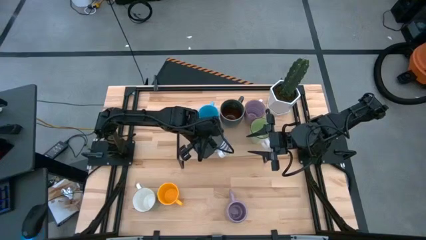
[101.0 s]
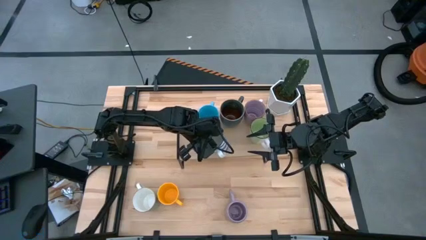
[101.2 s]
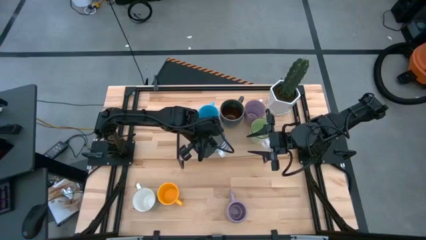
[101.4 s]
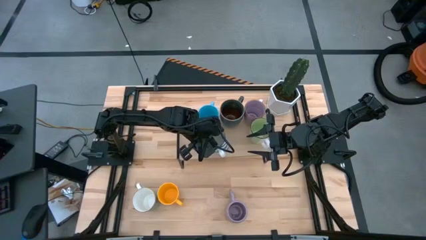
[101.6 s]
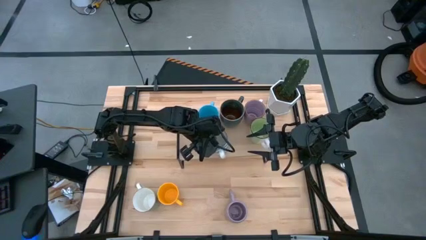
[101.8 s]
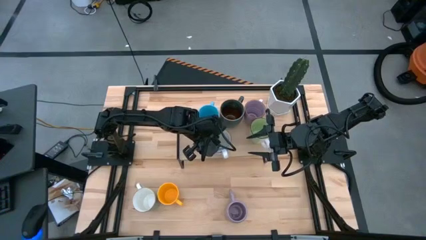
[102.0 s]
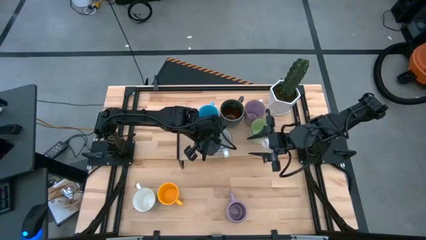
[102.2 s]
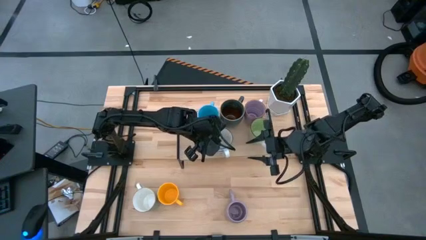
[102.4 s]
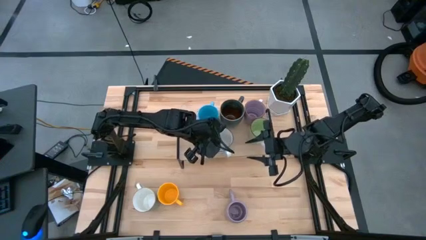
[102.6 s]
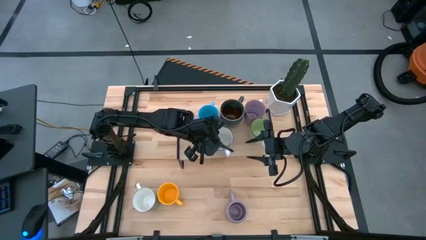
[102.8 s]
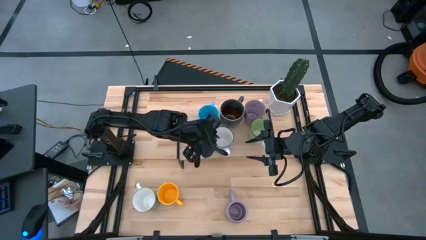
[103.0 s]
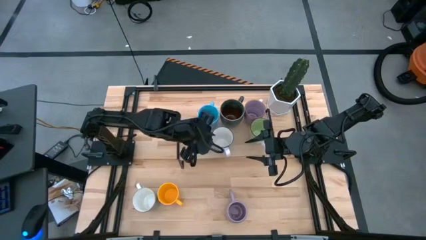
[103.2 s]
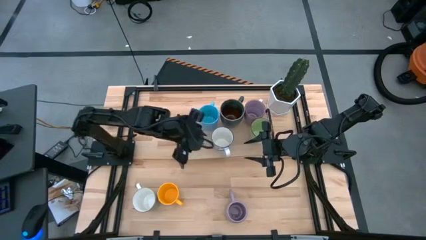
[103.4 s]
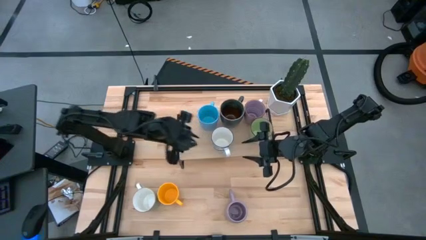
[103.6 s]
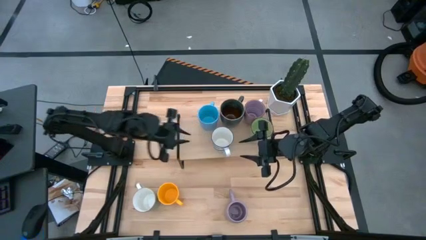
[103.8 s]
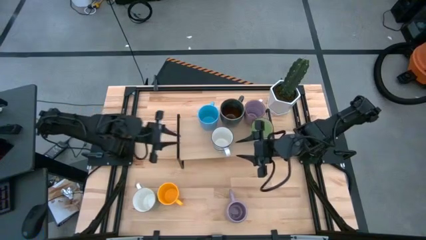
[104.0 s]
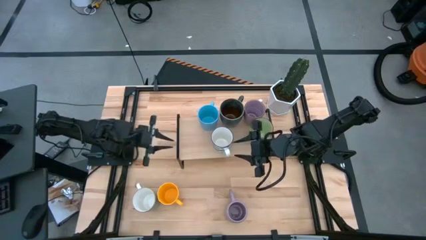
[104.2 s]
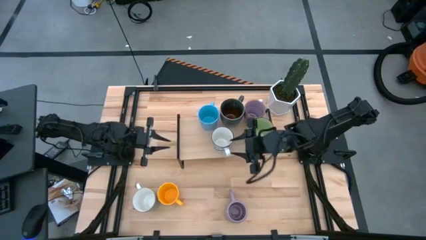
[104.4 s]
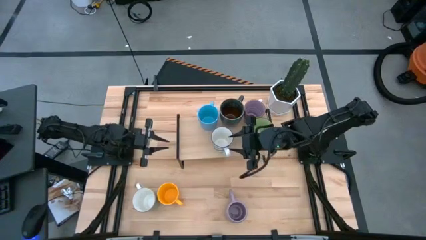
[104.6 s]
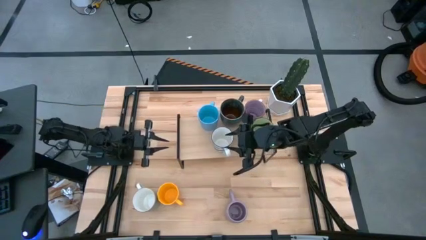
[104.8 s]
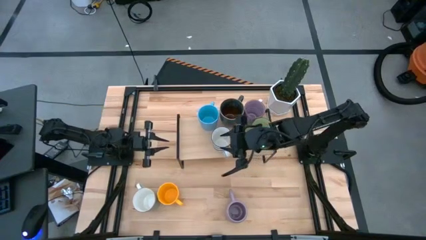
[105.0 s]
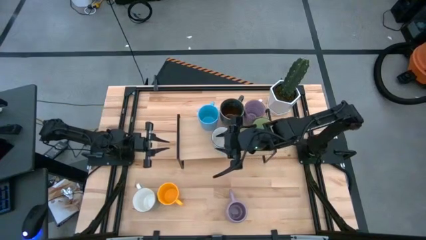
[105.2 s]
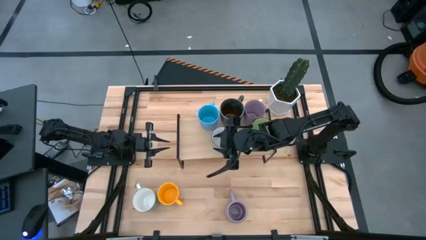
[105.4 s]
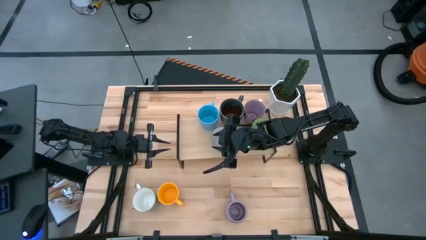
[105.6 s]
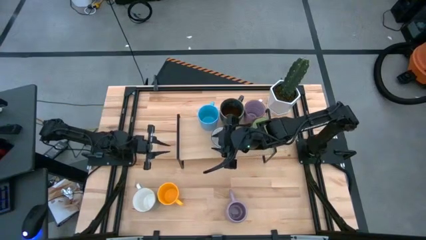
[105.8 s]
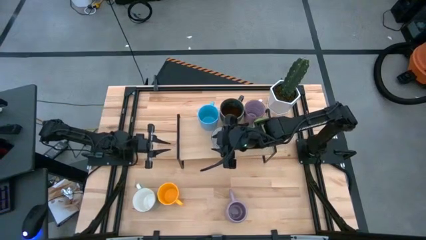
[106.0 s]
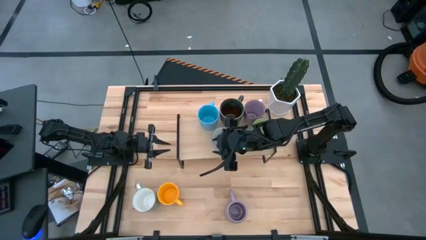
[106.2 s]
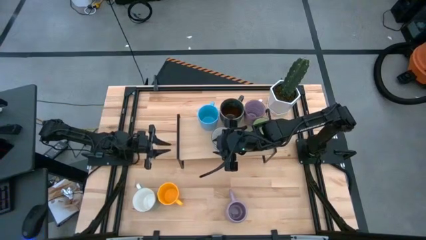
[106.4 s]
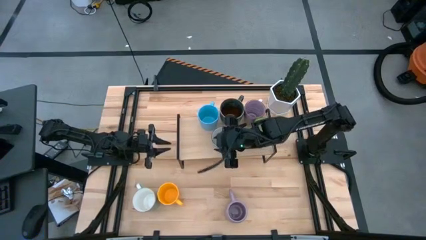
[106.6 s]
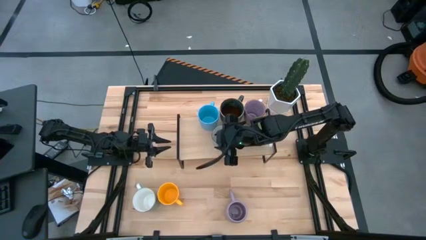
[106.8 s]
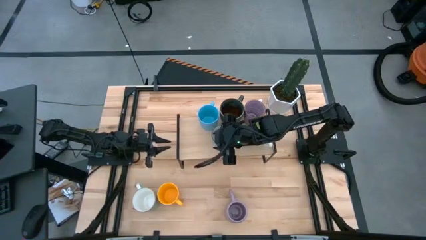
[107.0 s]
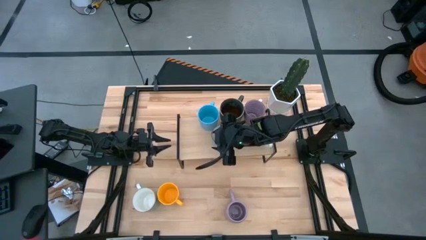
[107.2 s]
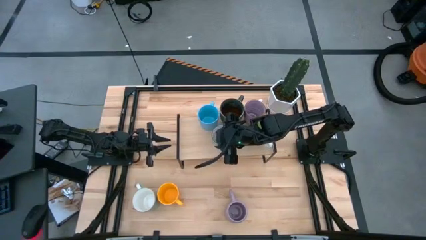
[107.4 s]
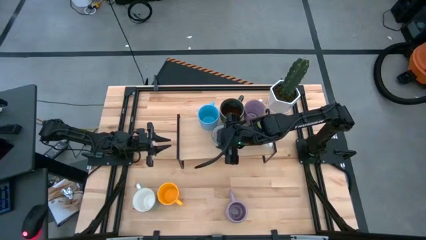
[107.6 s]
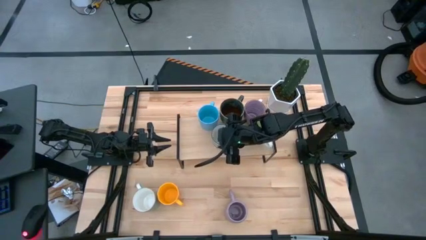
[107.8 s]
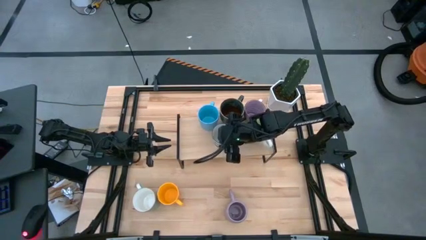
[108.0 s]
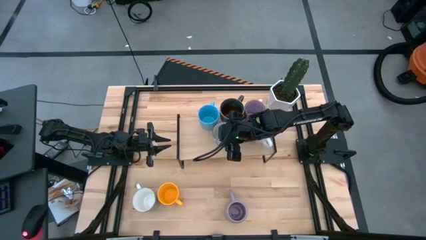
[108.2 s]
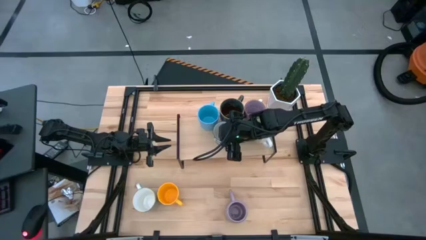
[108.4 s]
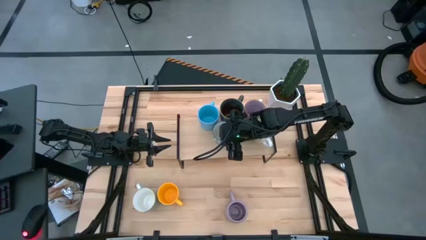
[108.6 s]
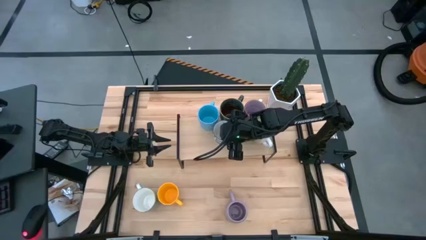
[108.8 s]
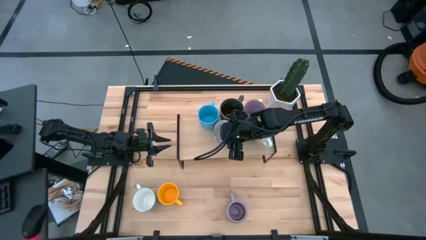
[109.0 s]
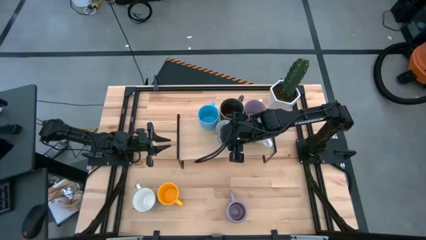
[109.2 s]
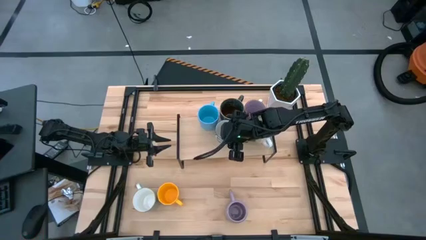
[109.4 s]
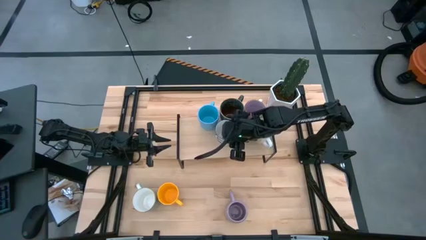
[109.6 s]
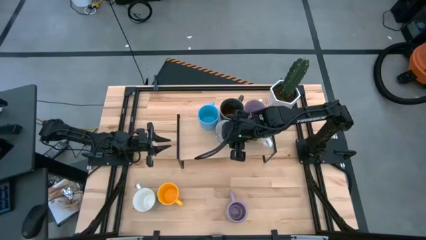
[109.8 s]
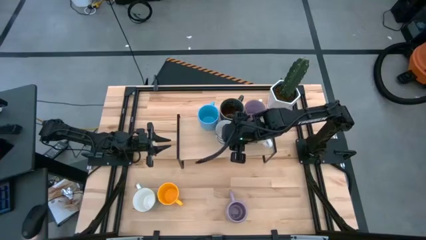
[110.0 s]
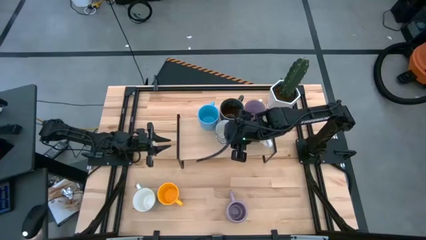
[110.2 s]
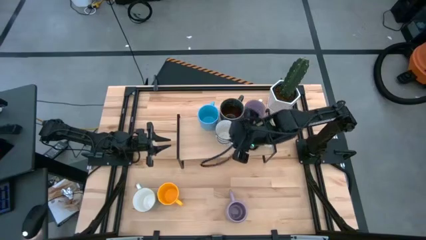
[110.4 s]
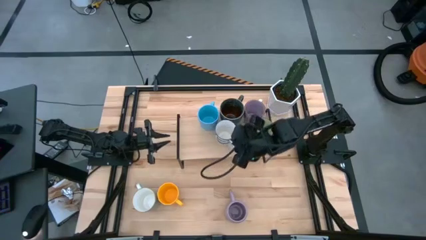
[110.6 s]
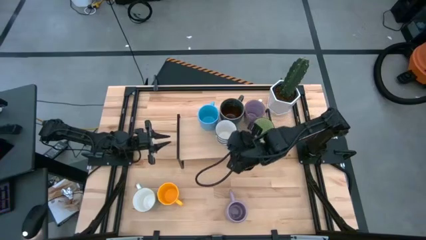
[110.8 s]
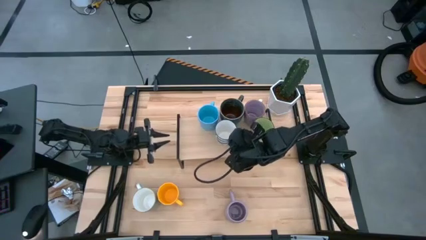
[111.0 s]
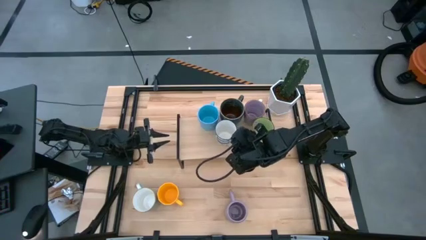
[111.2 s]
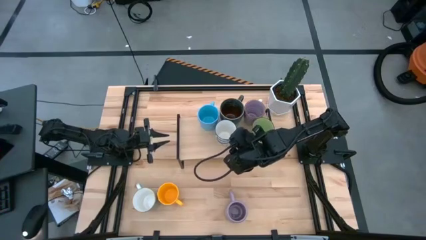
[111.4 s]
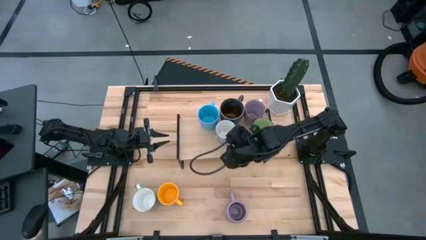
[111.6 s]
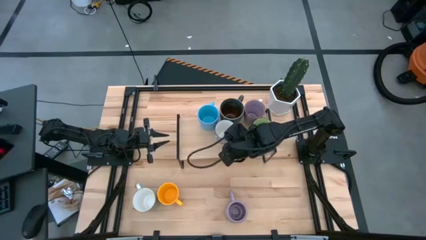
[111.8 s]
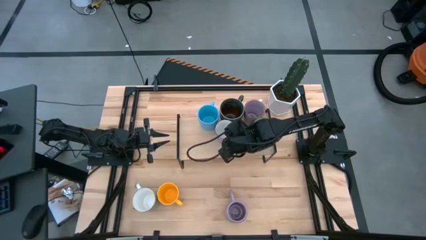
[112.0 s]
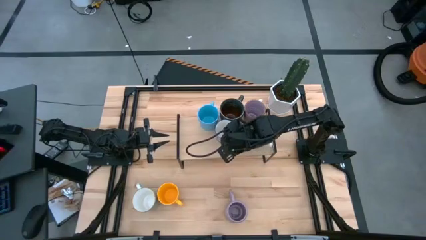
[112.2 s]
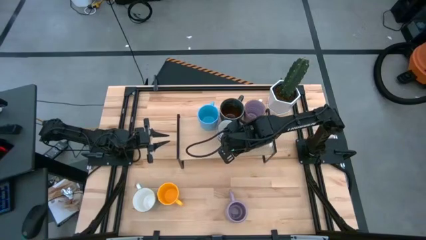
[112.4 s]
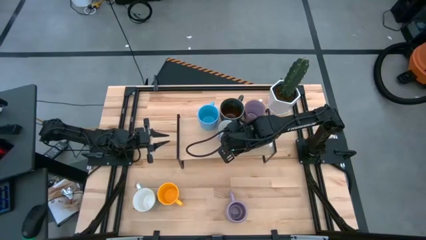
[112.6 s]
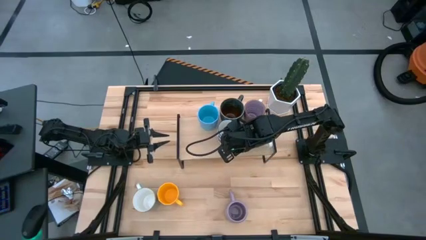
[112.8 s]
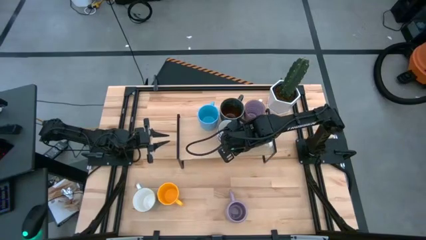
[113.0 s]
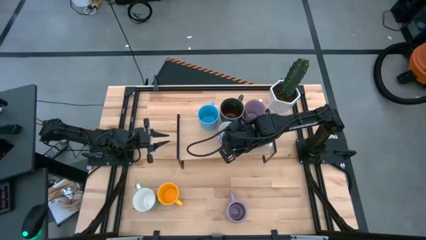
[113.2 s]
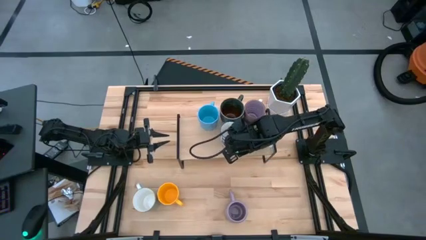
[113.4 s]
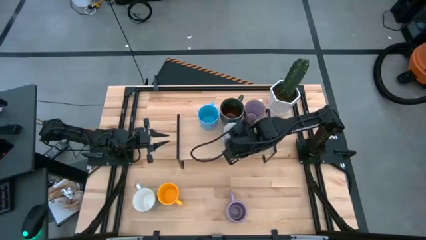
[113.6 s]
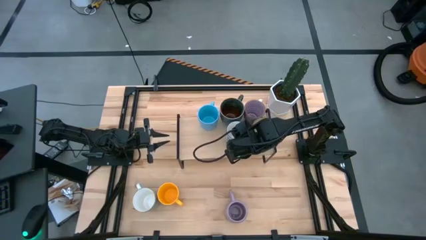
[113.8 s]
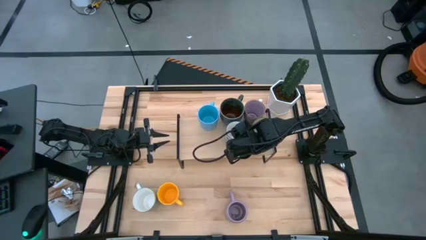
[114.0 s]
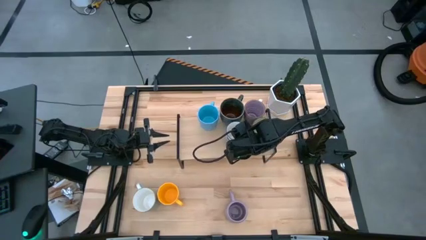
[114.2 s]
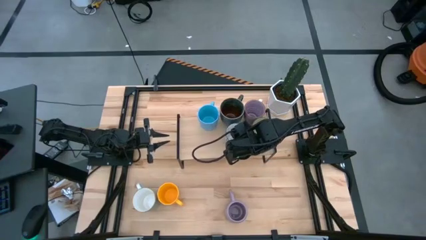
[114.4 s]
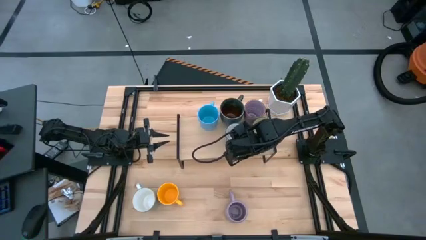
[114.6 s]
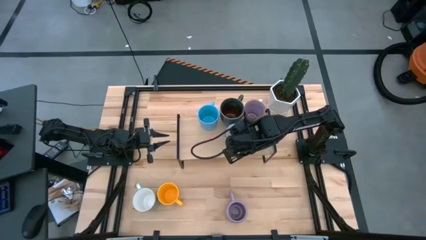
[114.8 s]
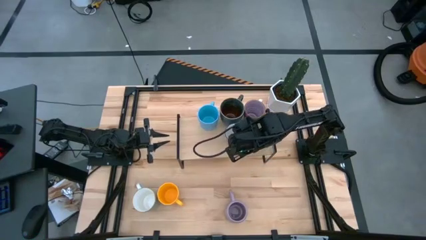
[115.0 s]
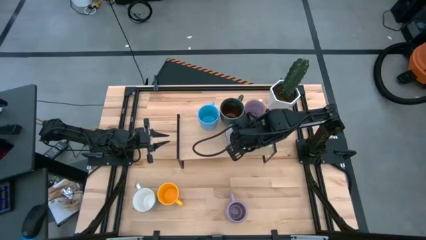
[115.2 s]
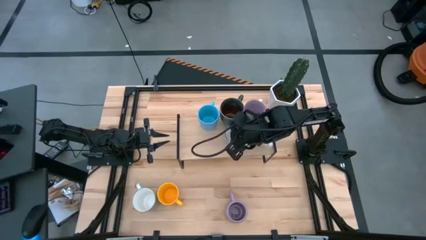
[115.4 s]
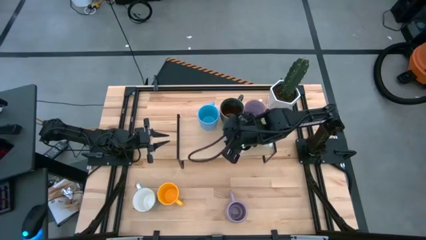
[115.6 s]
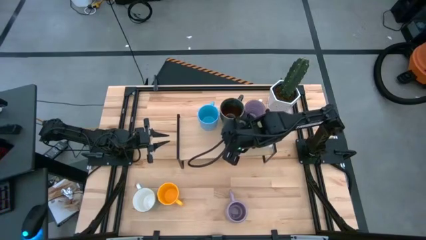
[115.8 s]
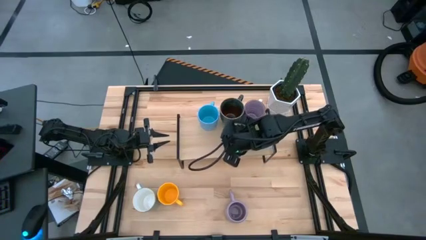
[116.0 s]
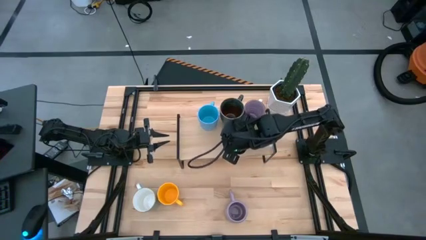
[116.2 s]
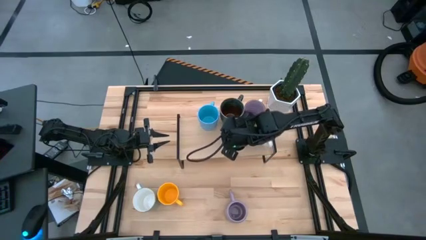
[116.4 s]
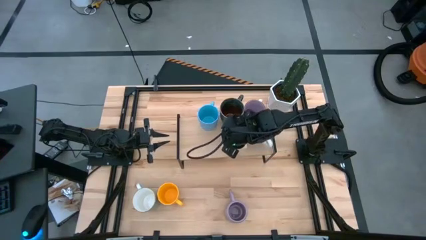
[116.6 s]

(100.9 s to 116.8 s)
Task: Place coffee mugs
Put the blue patterned mug on the shelf
